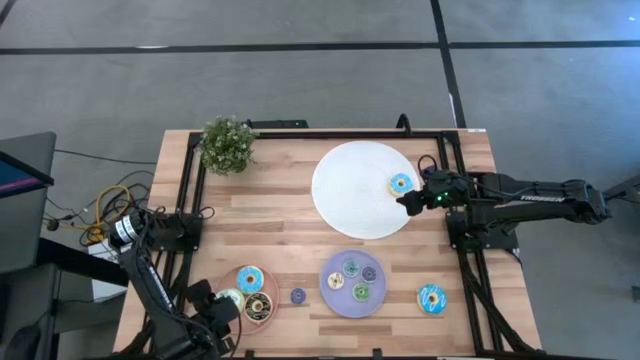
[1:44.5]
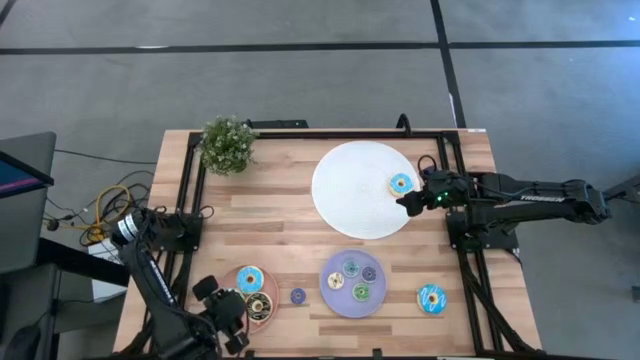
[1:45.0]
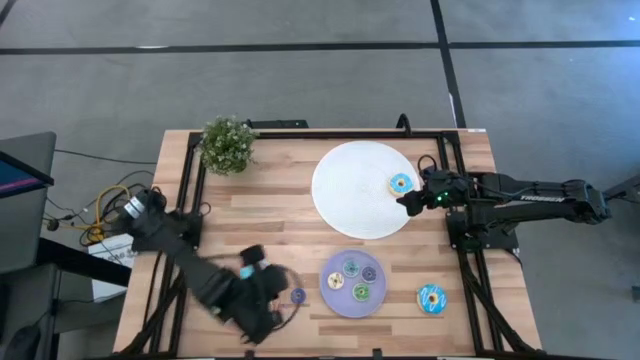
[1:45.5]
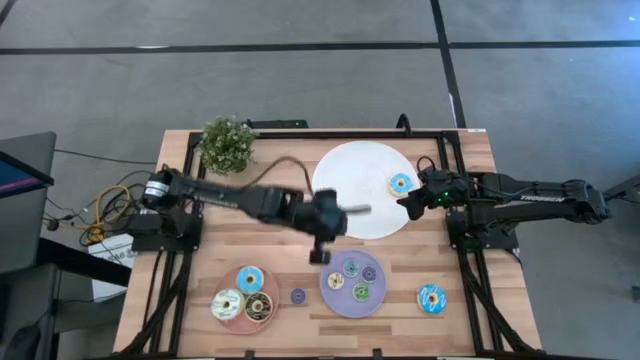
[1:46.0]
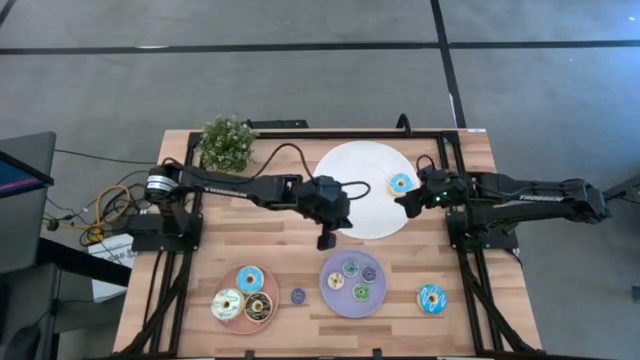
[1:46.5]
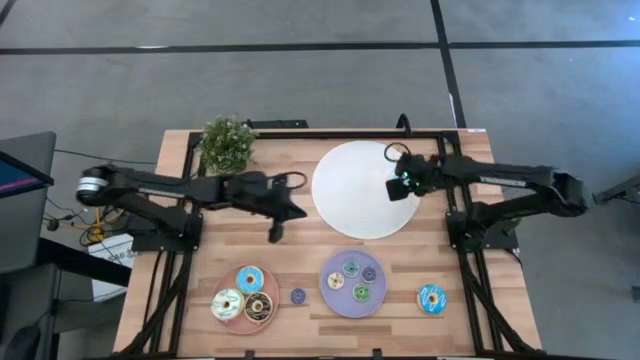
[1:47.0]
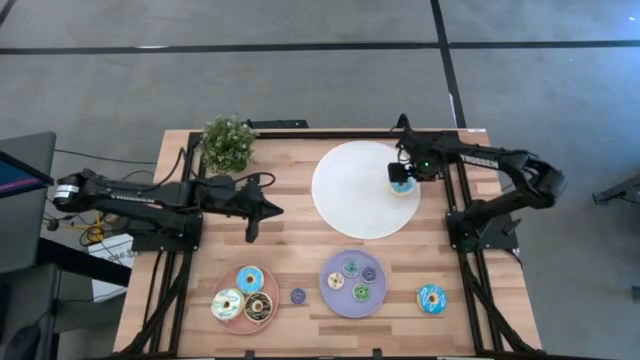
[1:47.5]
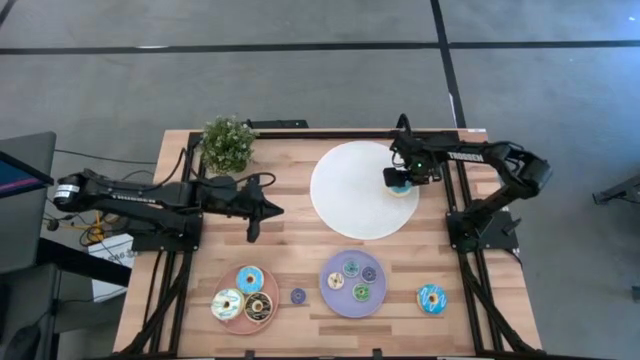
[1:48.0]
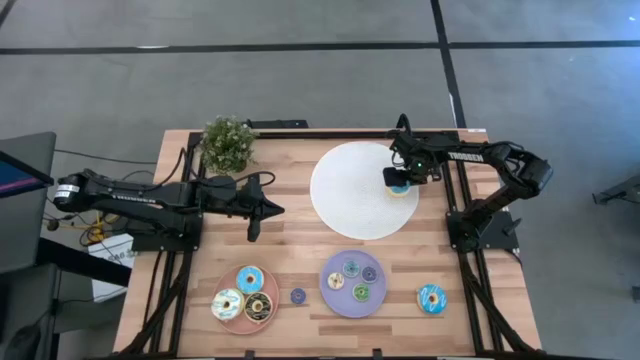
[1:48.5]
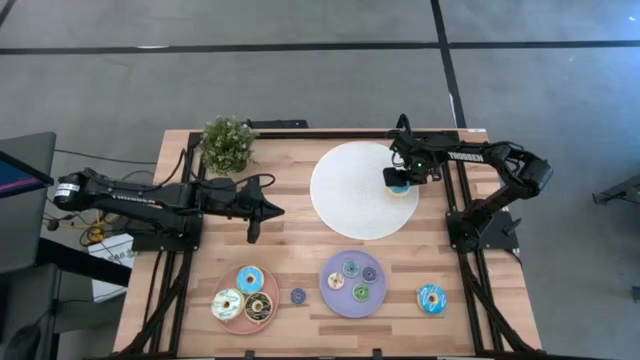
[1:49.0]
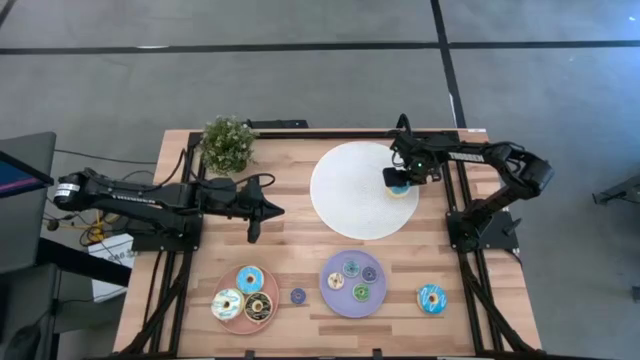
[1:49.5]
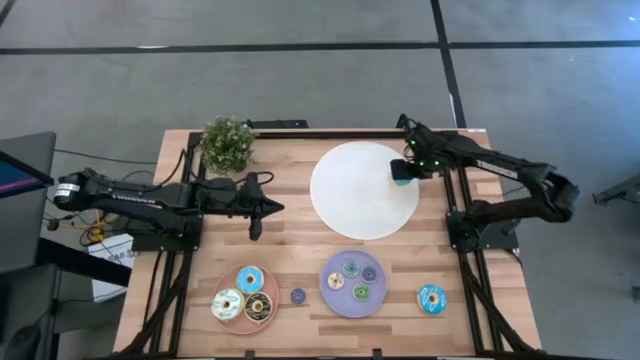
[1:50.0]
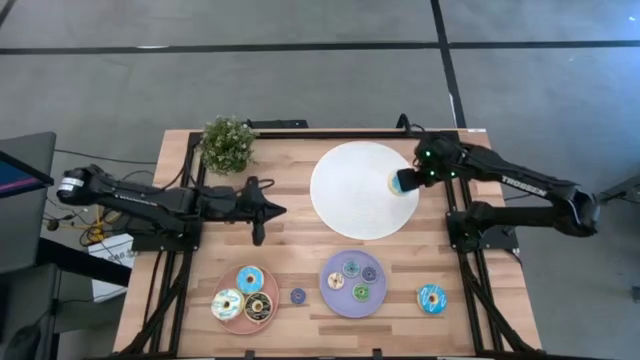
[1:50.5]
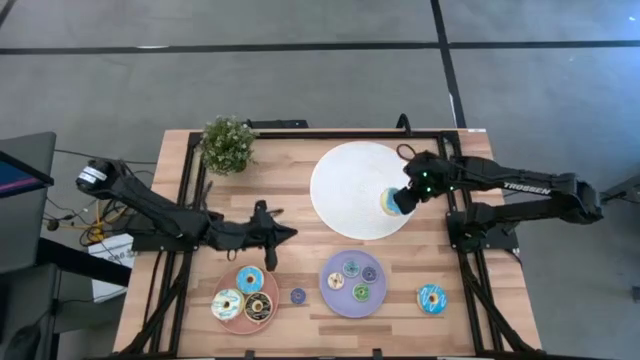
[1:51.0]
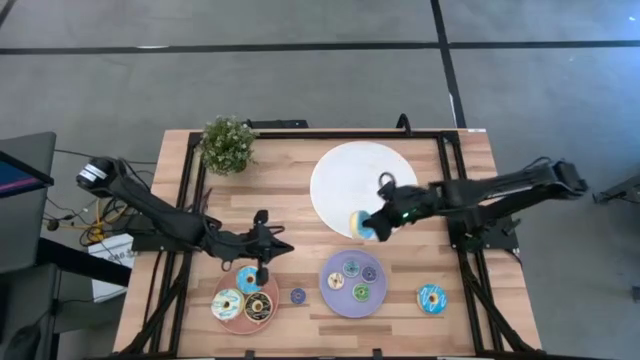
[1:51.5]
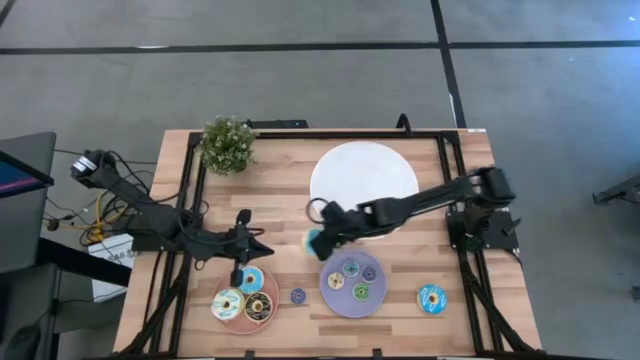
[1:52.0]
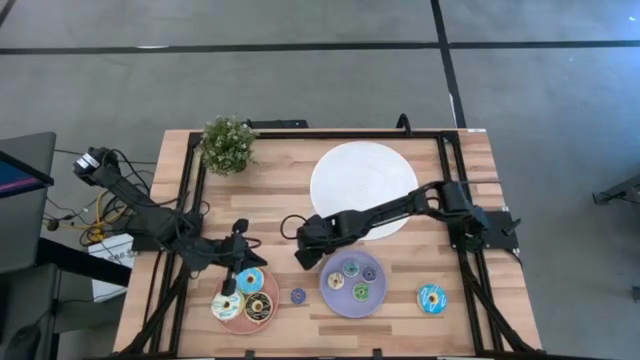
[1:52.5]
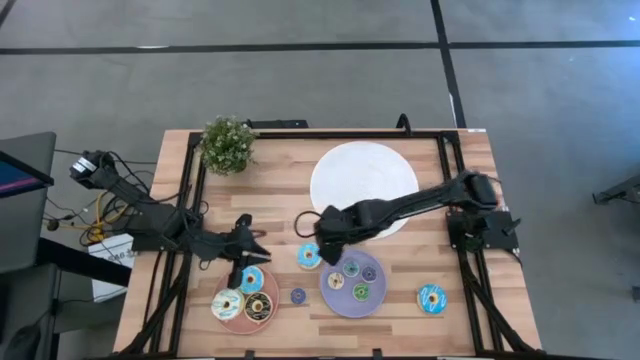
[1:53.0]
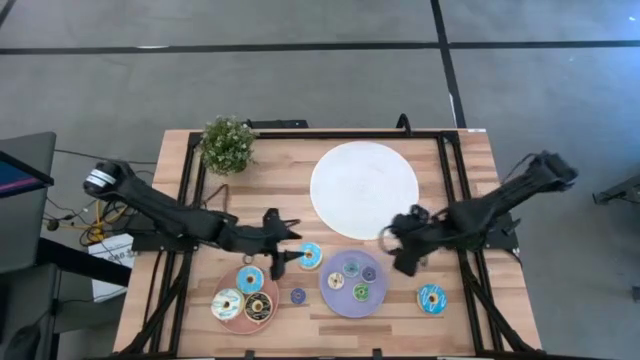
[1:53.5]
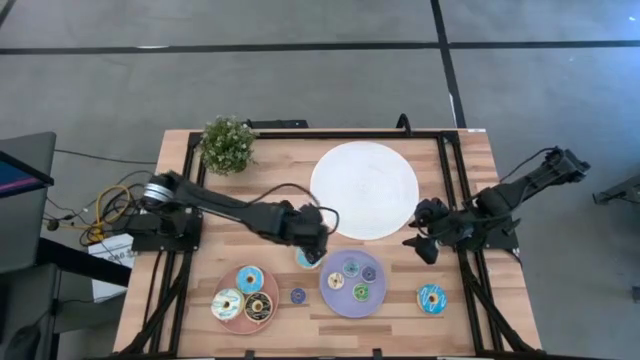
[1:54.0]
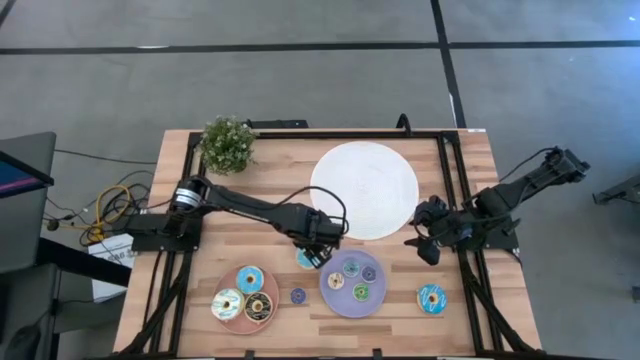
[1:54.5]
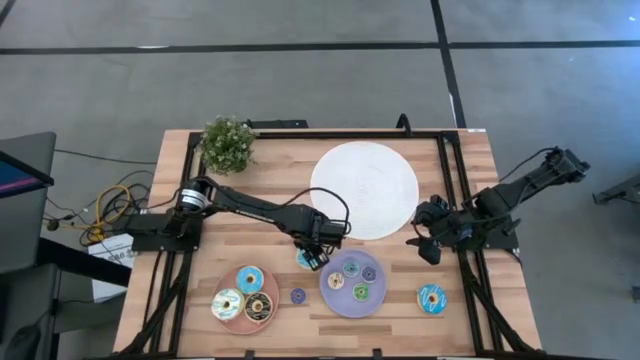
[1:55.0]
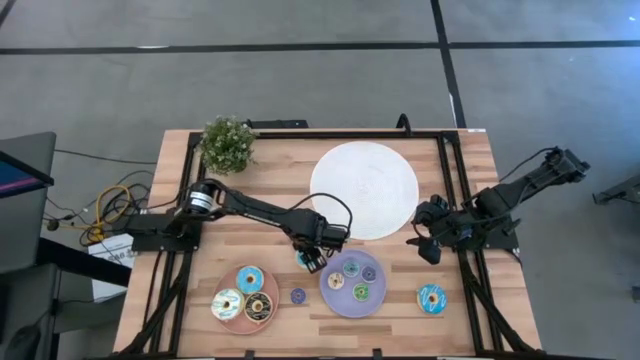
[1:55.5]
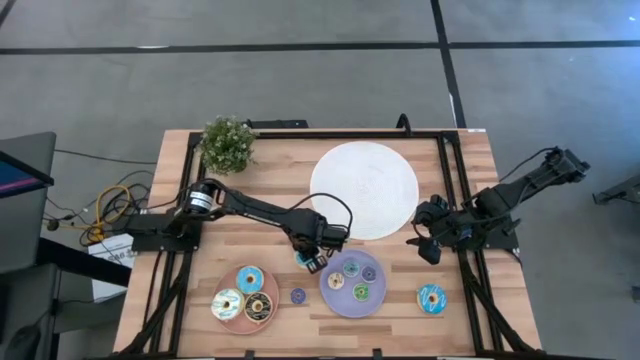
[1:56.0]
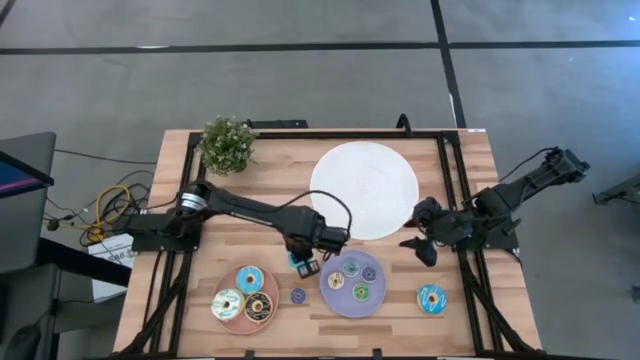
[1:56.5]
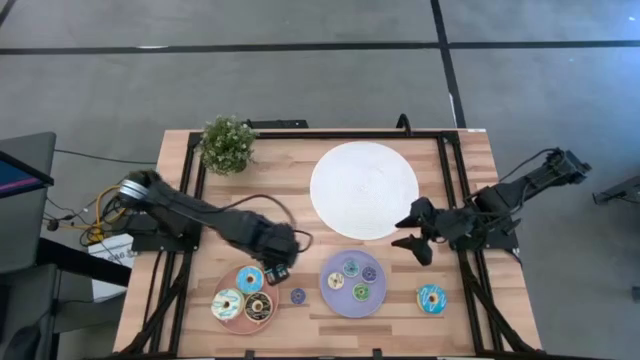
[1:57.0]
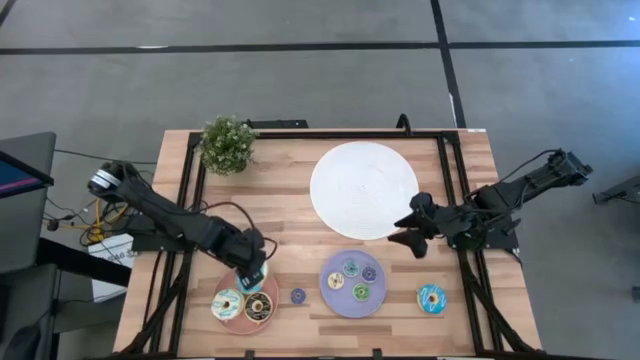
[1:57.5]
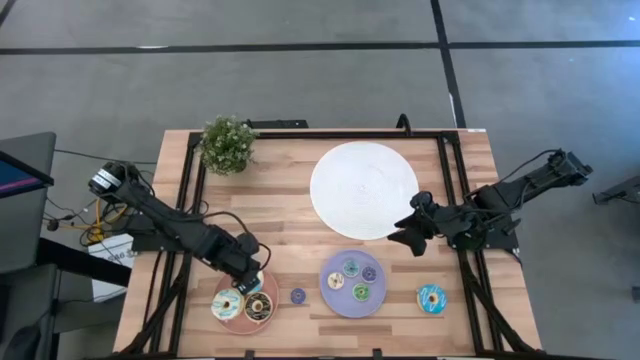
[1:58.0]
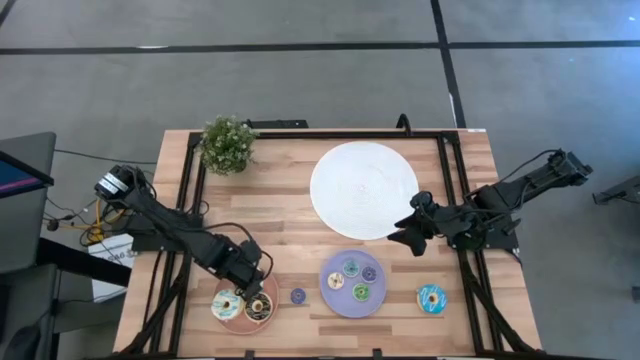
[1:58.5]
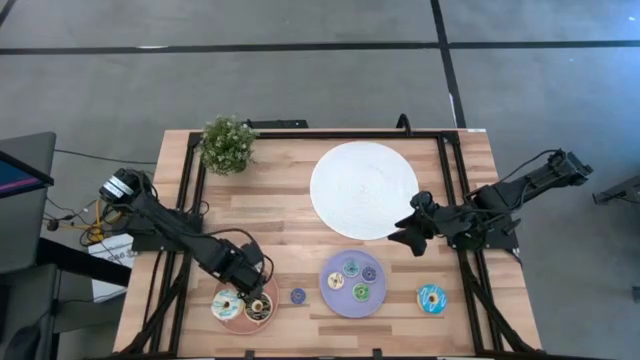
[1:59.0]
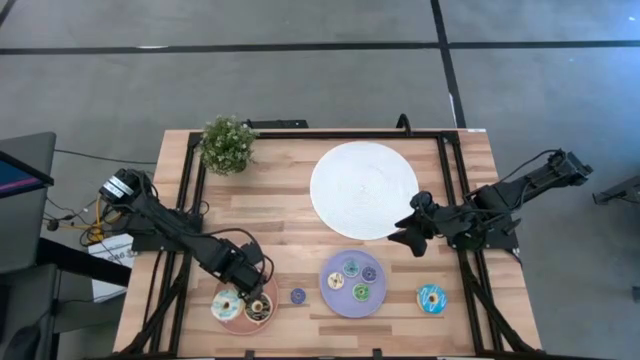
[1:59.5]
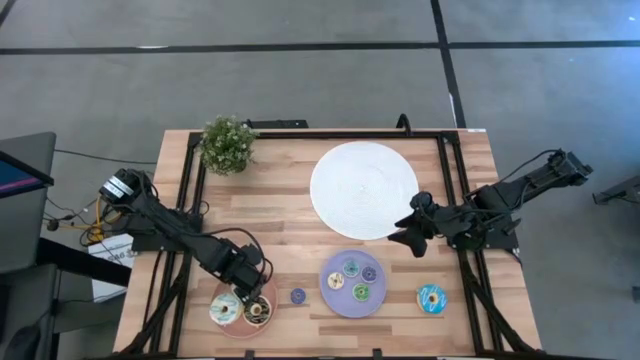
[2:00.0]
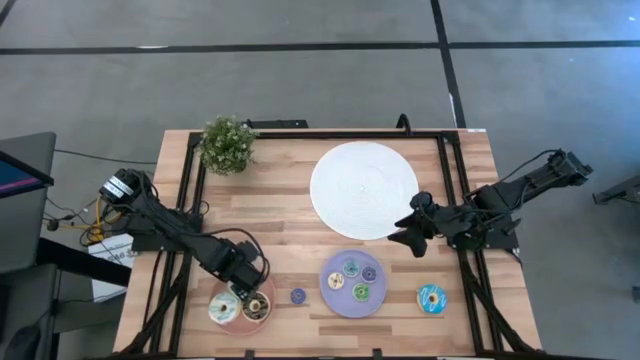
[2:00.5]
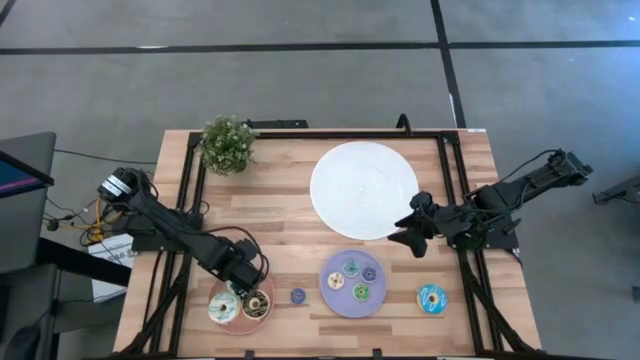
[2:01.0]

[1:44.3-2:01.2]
Task: Pick & Place donuts
Put the top big light blue donut on the pink plate

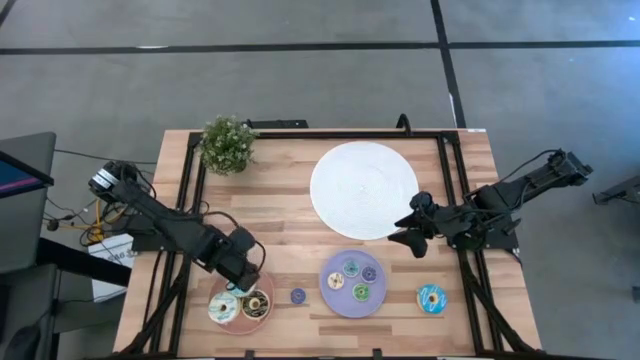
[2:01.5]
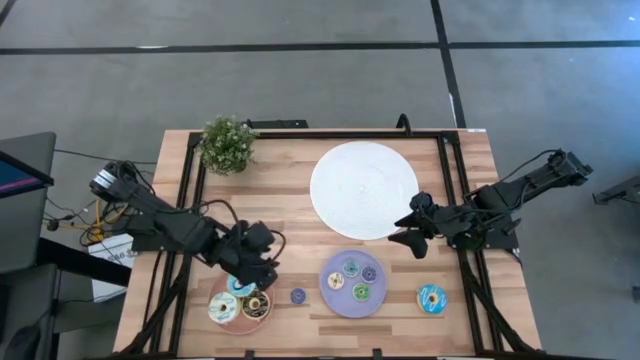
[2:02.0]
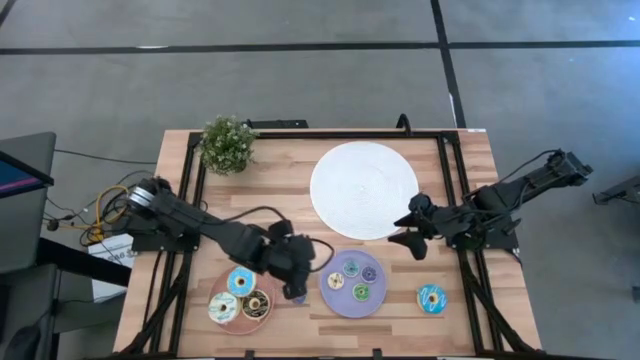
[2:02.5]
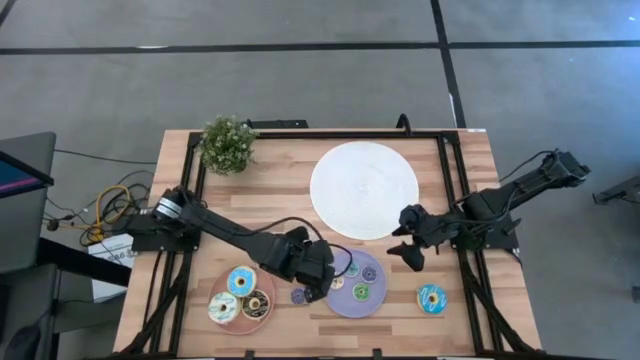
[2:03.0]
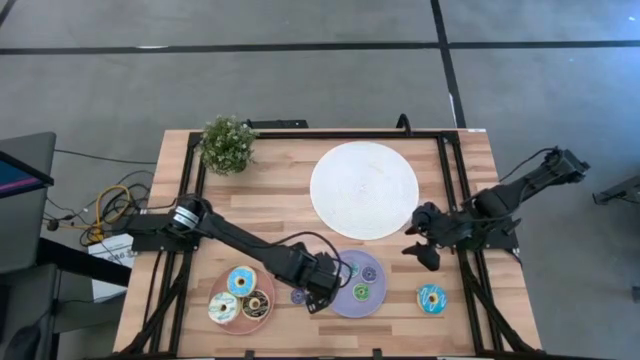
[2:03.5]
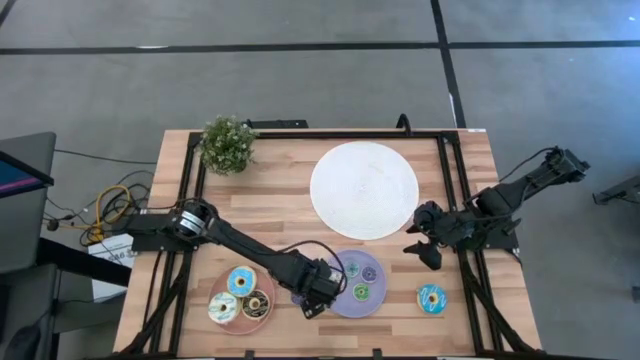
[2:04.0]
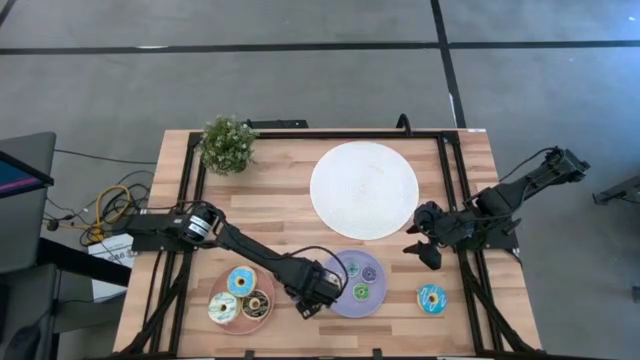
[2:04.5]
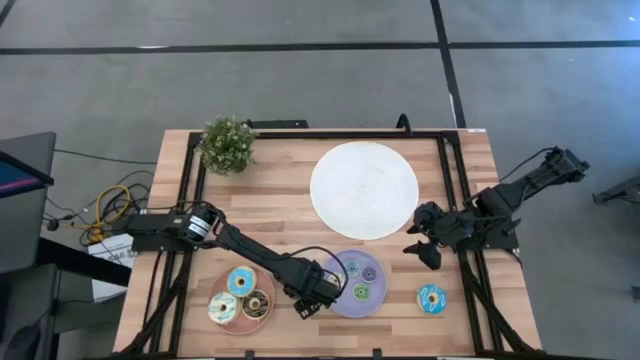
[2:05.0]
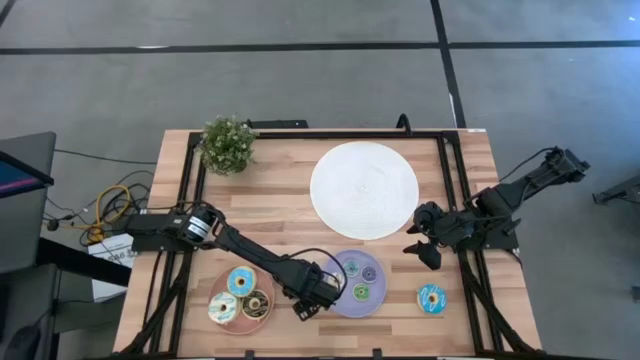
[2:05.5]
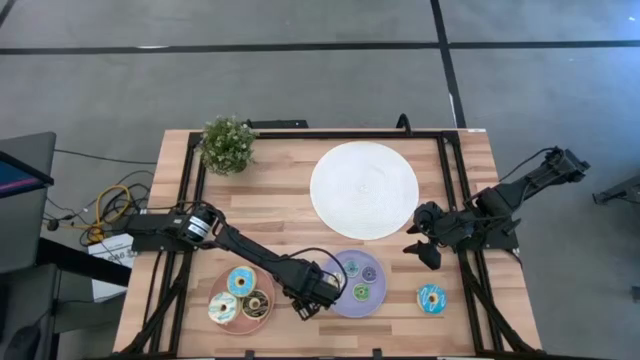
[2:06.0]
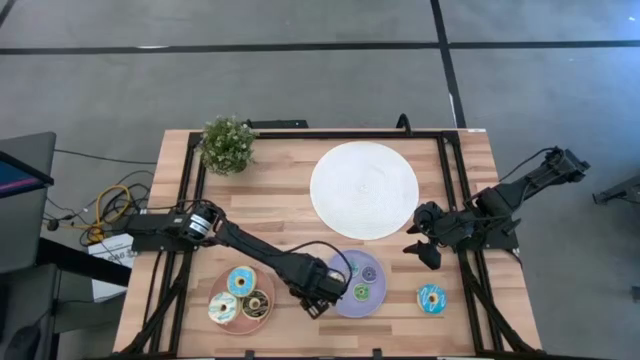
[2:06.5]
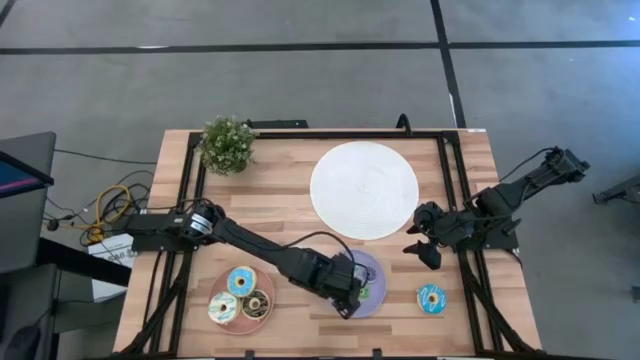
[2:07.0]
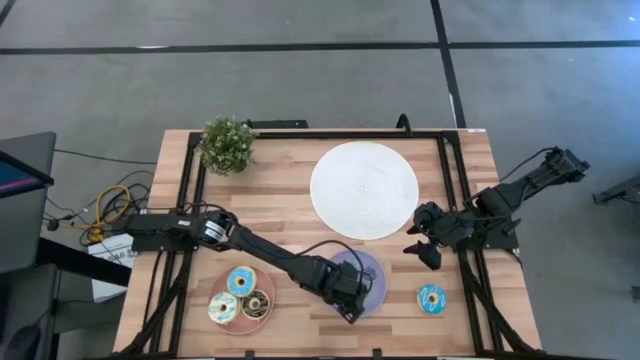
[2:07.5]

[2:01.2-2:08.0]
Put the small purple donut on the purple plate
